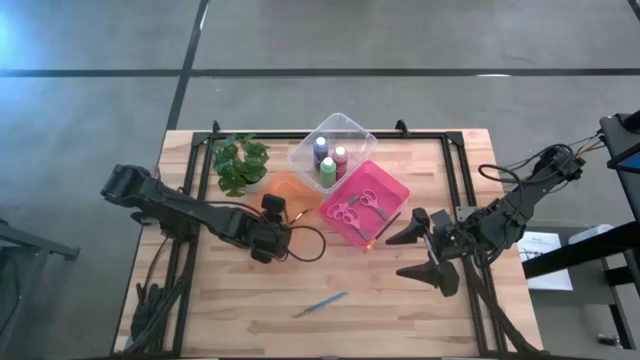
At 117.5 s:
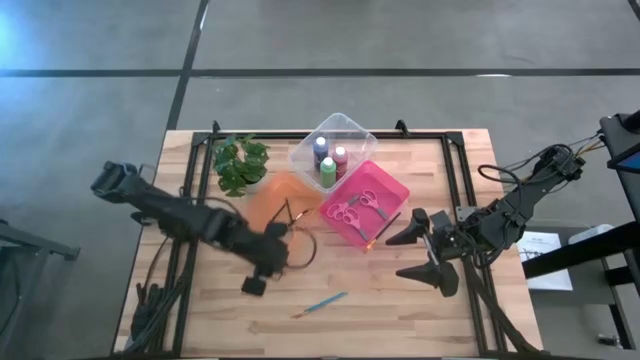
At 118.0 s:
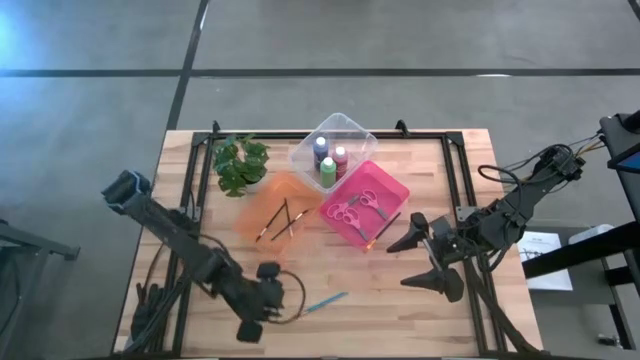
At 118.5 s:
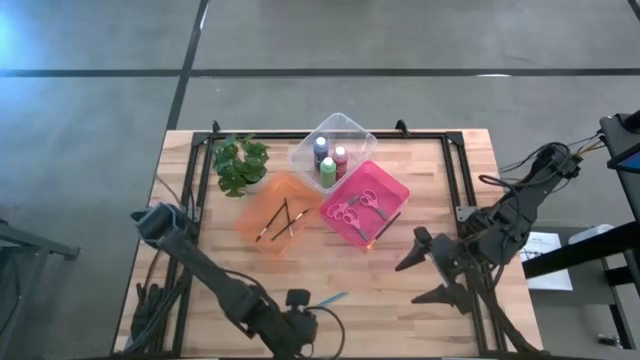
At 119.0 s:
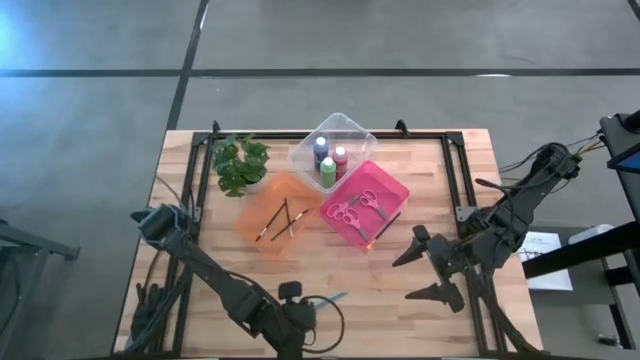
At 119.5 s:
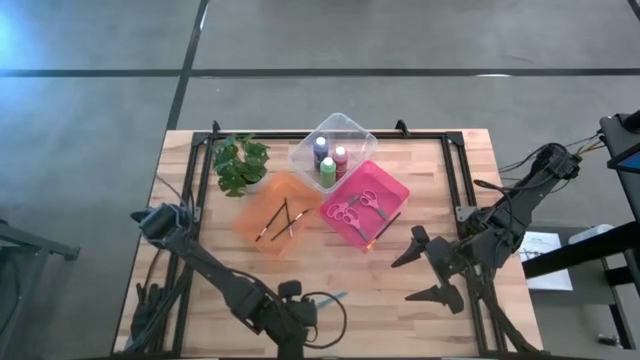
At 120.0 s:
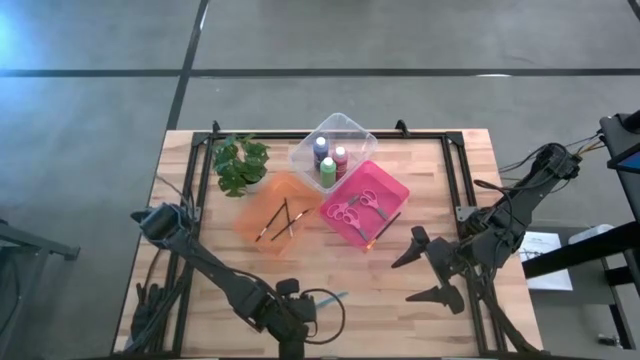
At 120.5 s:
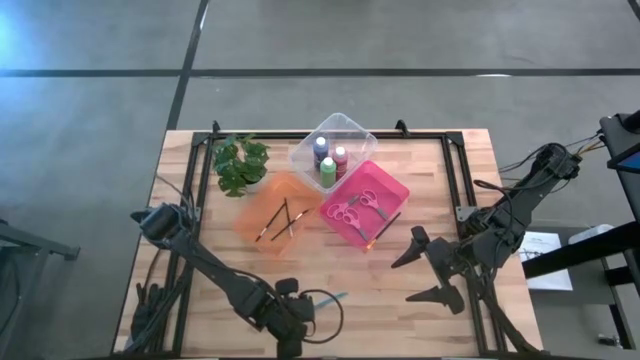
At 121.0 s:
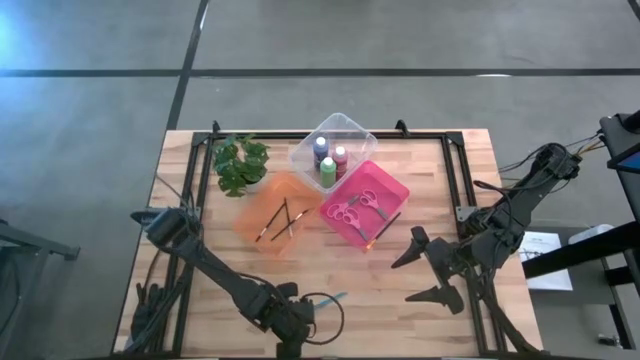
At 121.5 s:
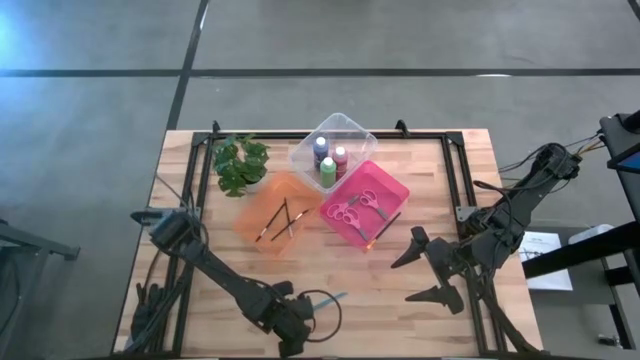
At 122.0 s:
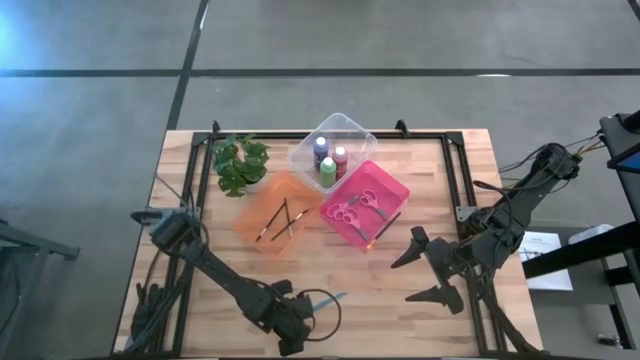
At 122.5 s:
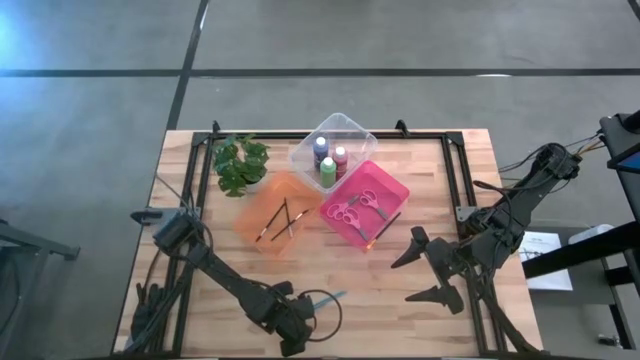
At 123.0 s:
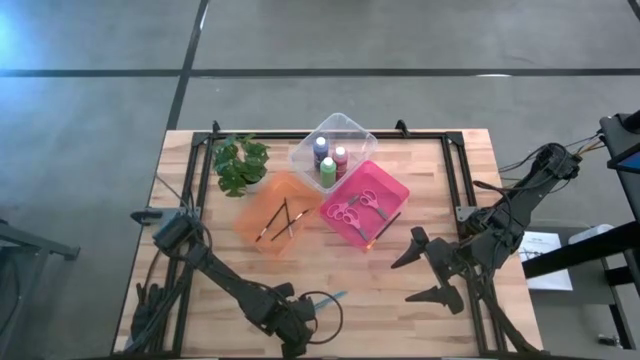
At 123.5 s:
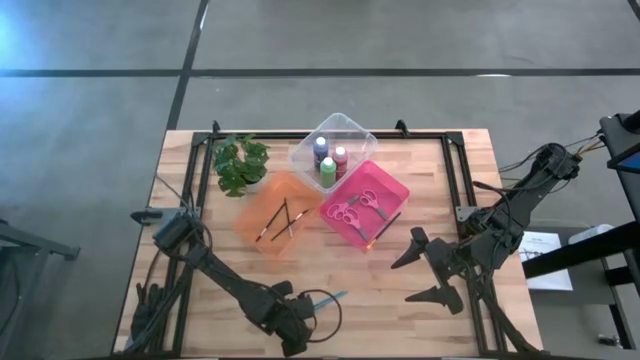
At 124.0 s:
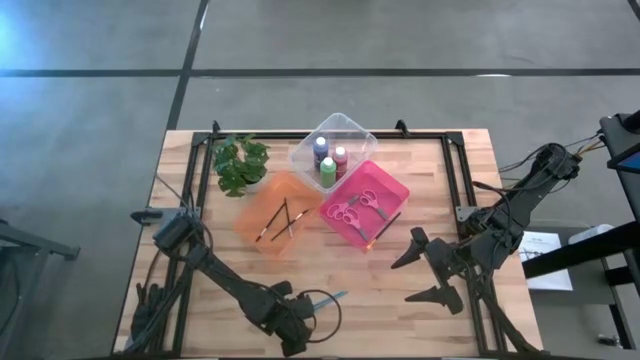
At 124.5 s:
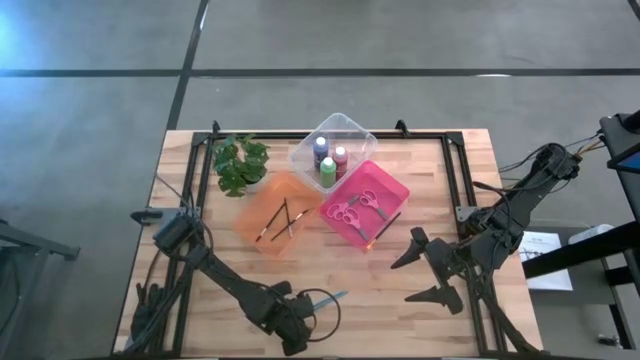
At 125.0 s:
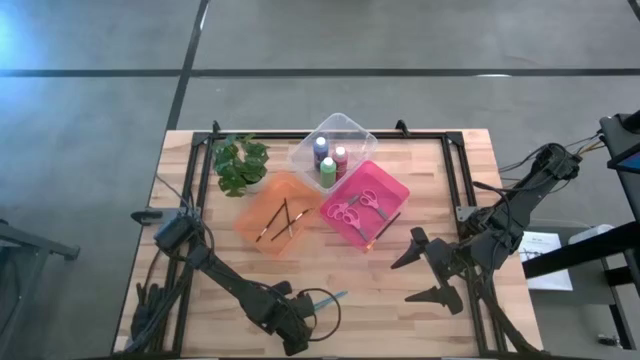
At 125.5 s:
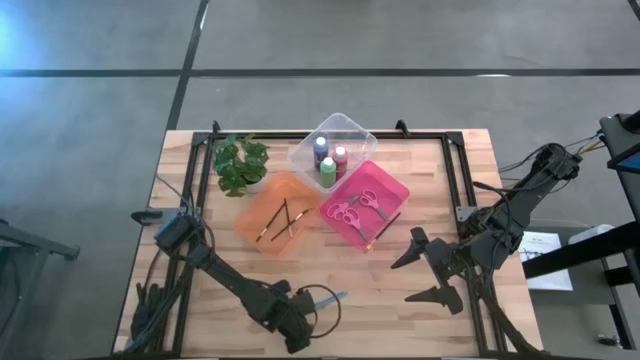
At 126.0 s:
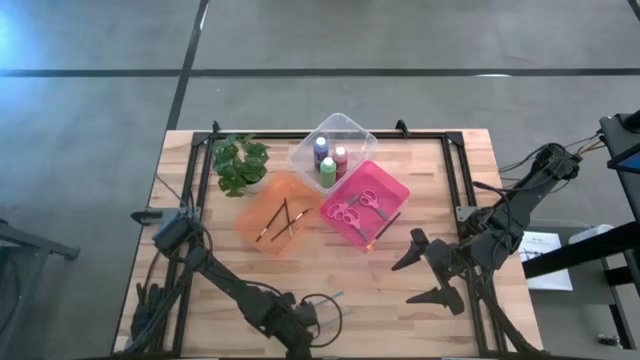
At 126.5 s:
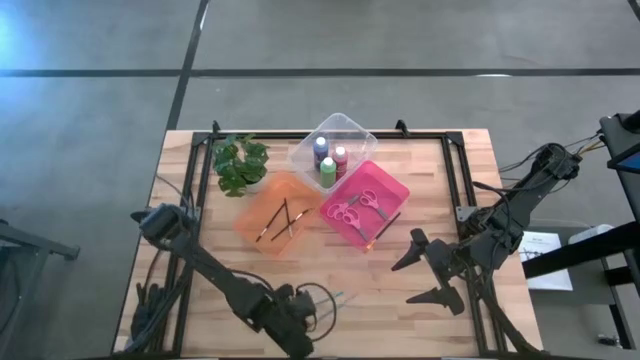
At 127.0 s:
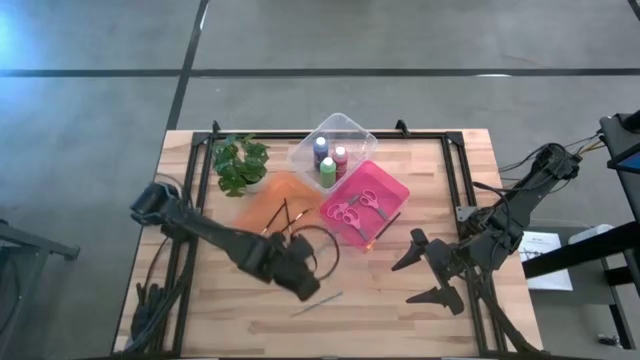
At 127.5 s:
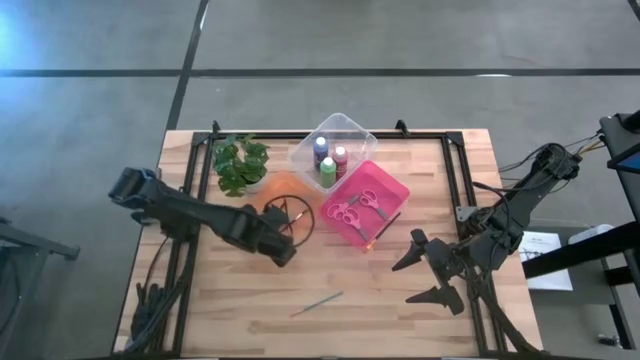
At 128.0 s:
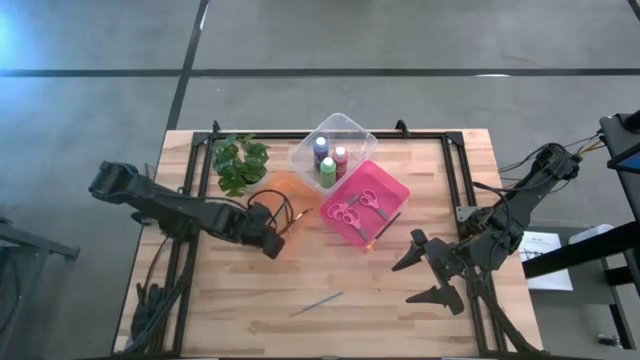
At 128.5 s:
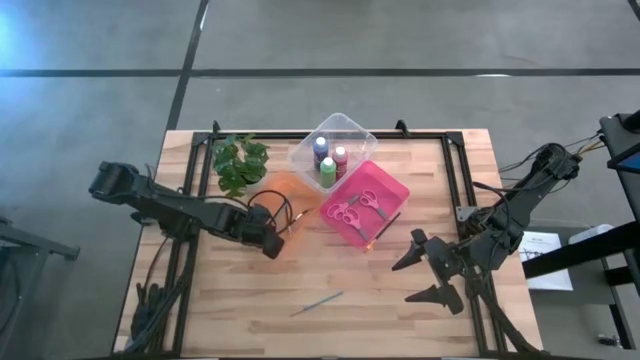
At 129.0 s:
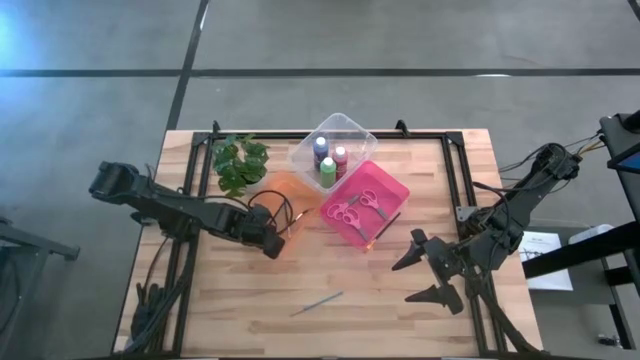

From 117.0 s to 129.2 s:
Task: Pick & Place Paint Supplies
Put the bottom blue paint brush into the yellow bin

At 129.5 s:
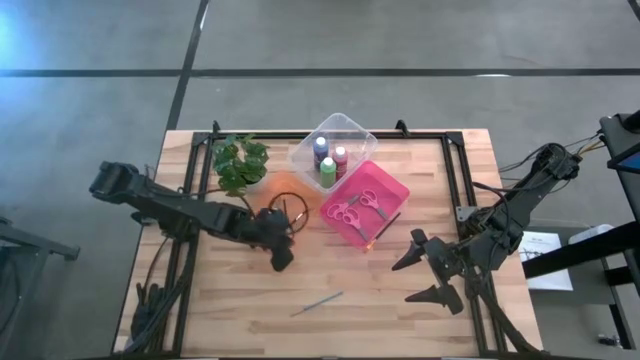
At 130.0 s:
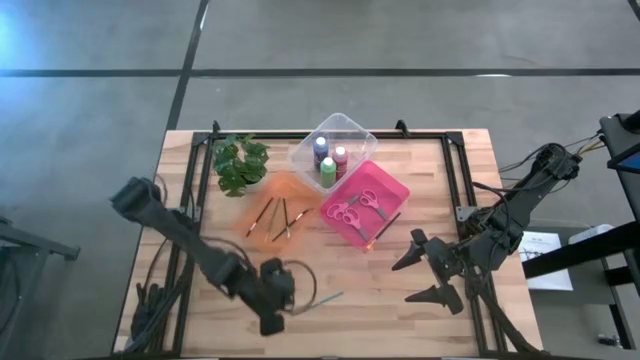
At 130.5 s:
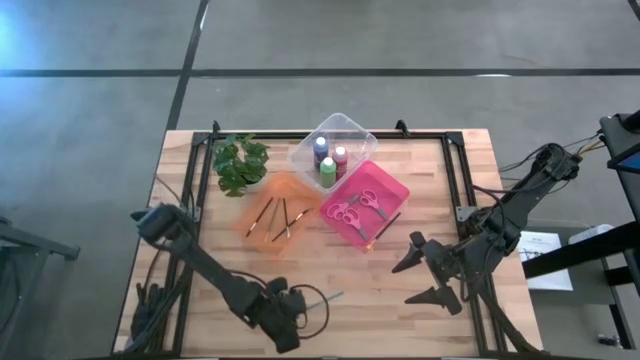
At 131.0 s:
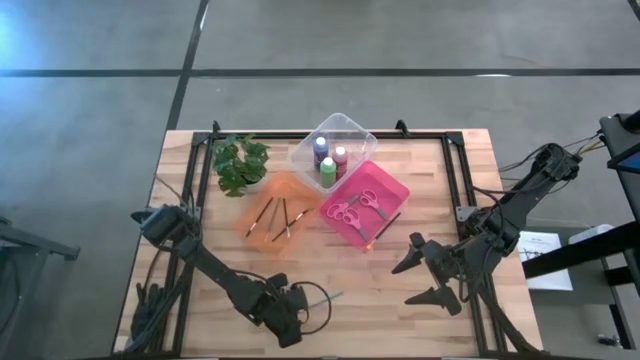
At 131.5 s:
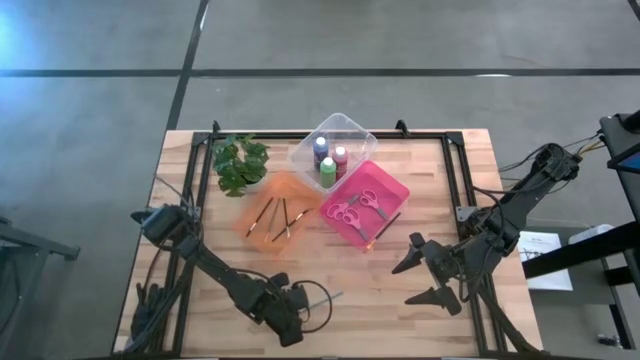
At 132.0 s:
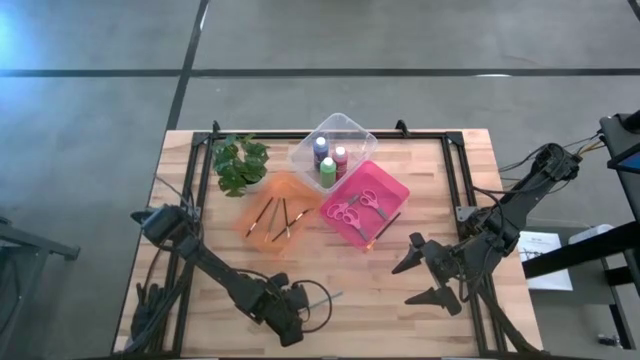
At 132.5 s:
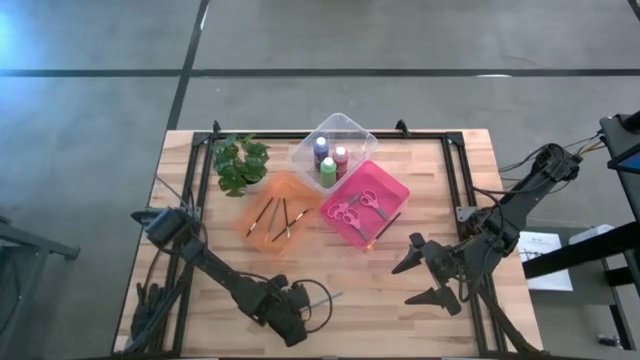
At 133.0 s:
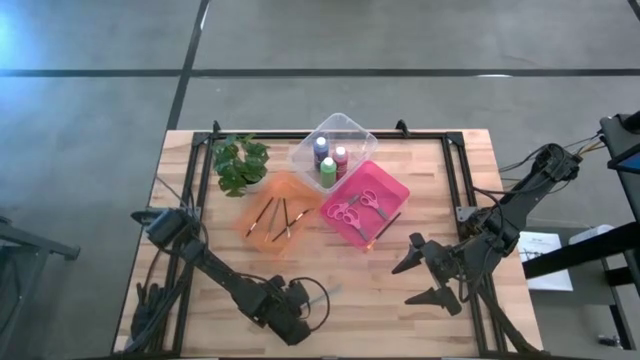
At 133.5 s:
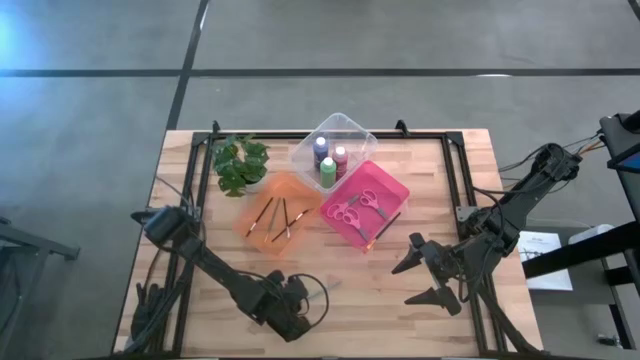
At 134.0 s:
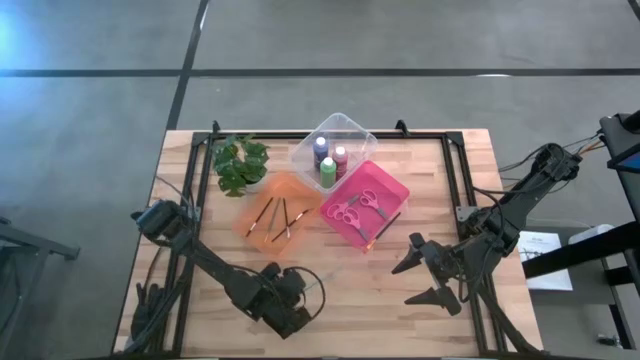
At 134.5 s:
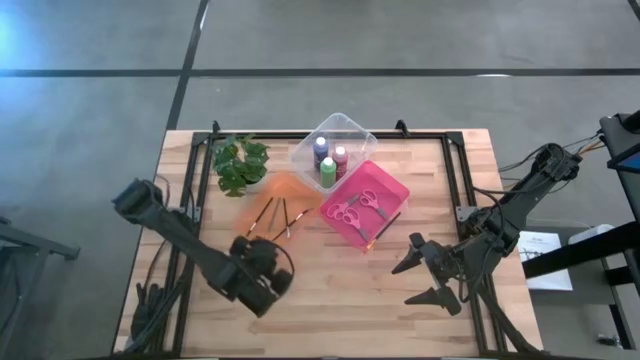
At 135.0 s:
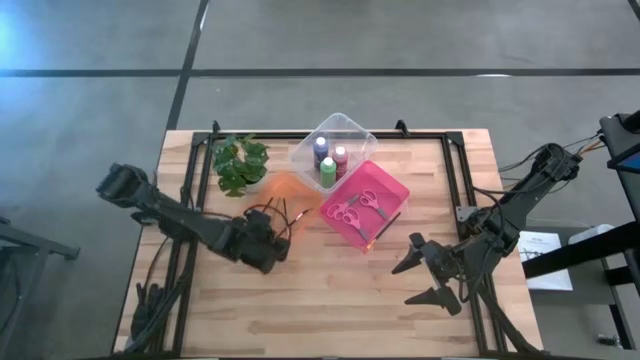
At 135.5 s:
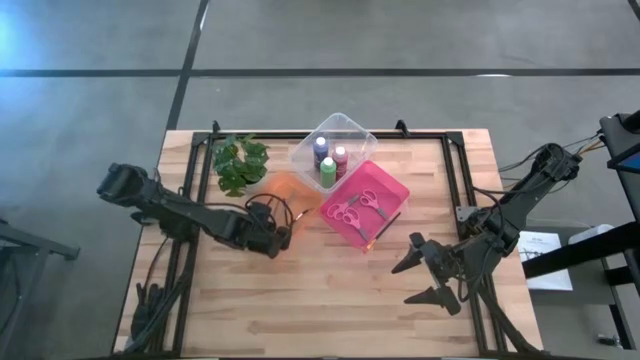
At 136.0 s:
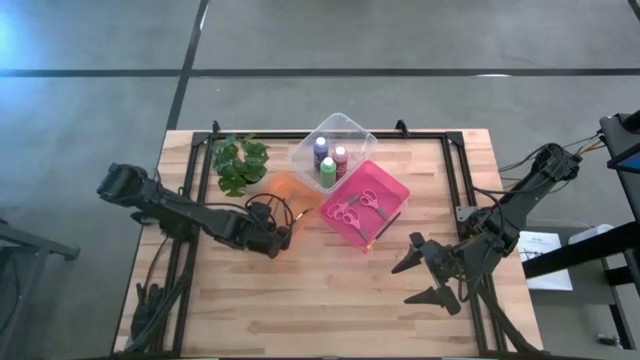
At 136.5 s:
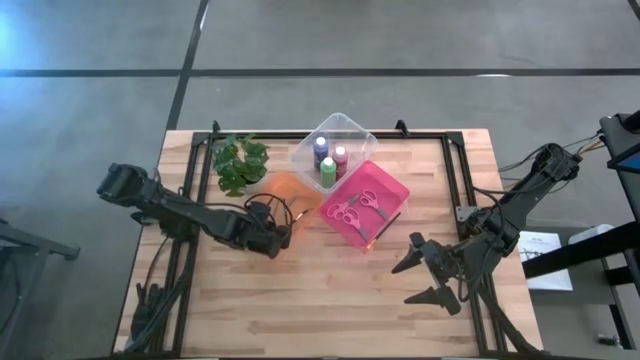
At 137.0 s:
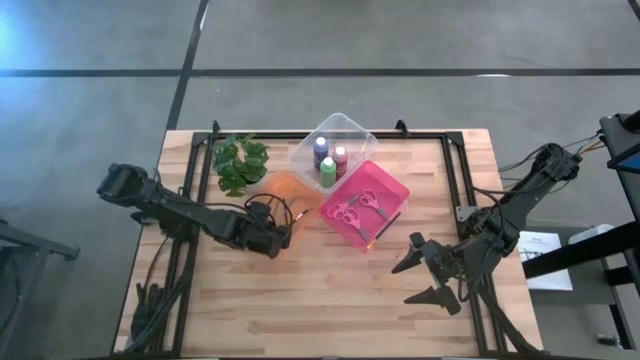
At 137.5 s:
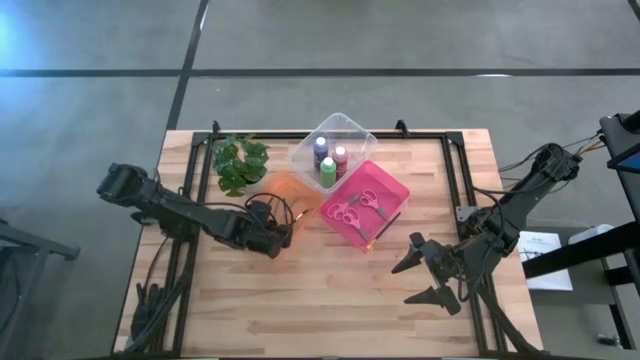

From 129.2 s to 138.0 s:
Put the blue paint brush into the yellow bin
